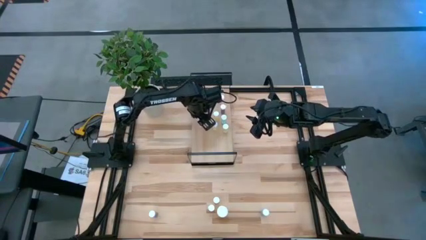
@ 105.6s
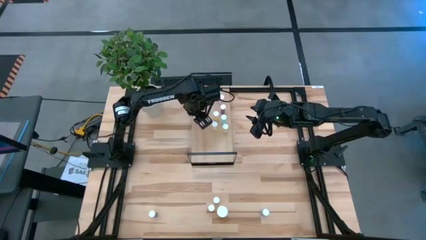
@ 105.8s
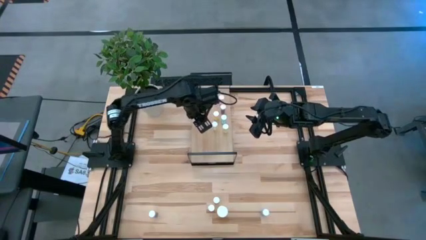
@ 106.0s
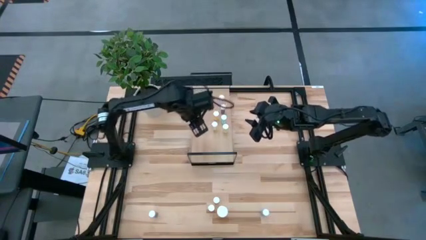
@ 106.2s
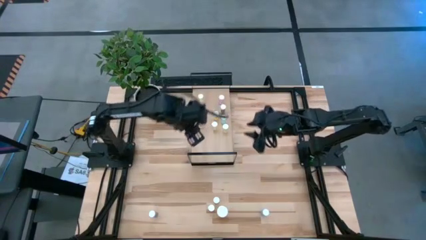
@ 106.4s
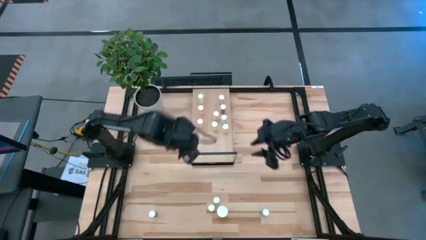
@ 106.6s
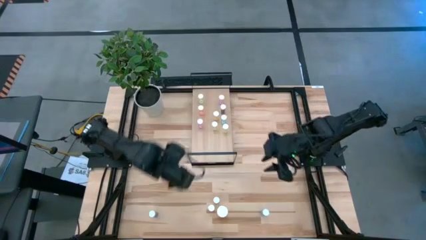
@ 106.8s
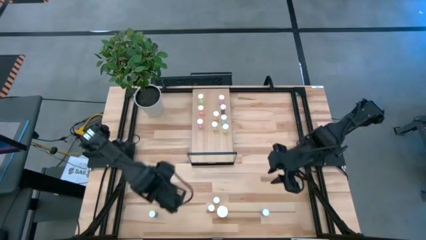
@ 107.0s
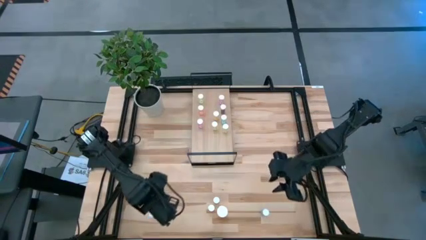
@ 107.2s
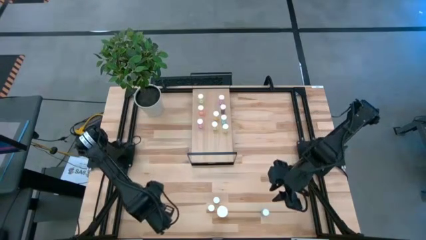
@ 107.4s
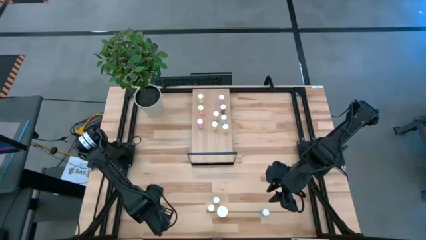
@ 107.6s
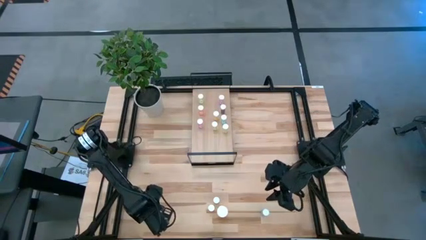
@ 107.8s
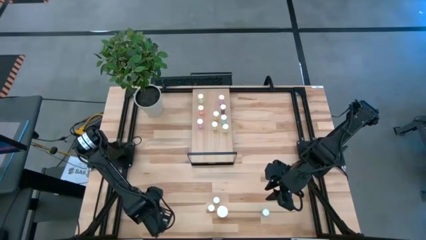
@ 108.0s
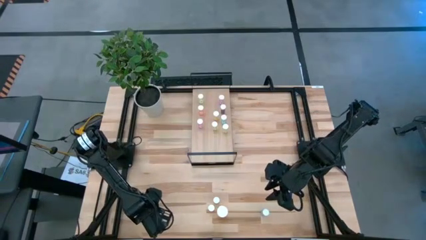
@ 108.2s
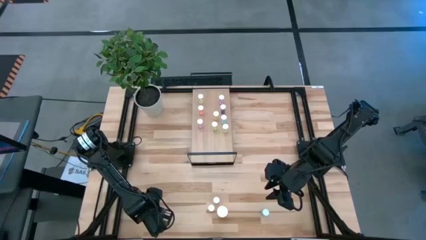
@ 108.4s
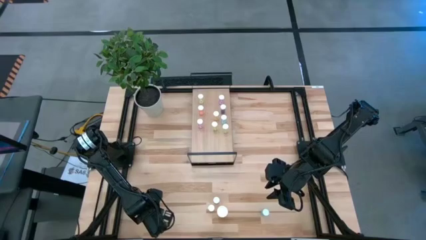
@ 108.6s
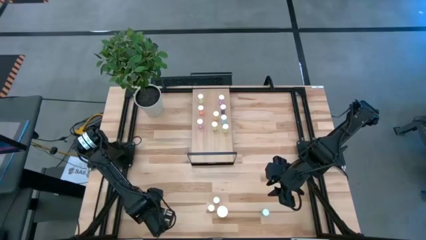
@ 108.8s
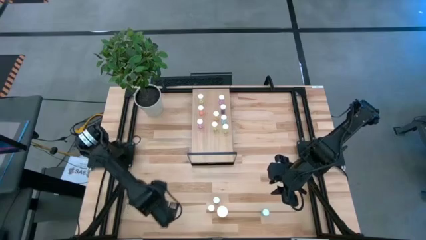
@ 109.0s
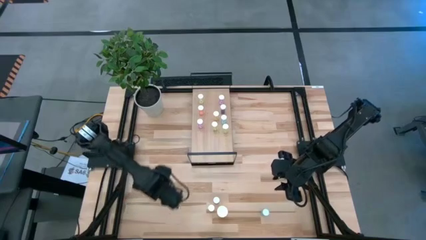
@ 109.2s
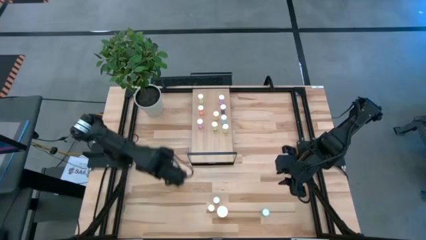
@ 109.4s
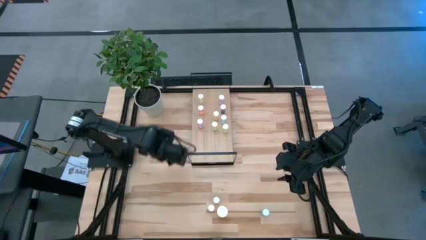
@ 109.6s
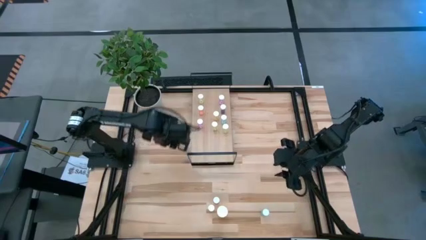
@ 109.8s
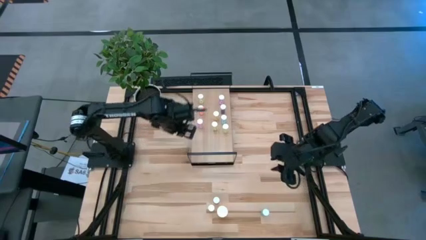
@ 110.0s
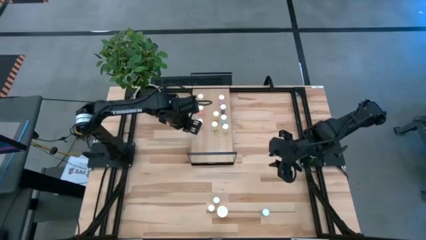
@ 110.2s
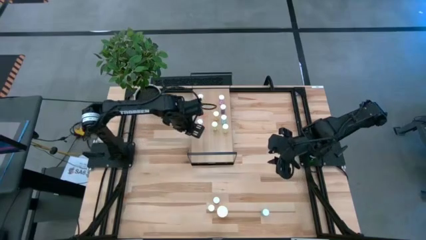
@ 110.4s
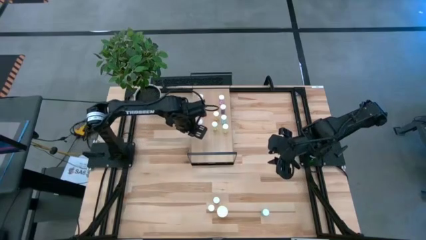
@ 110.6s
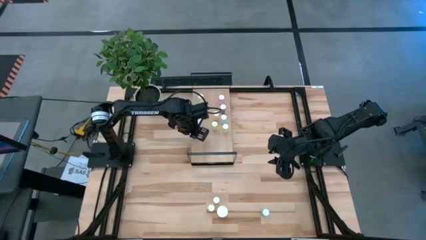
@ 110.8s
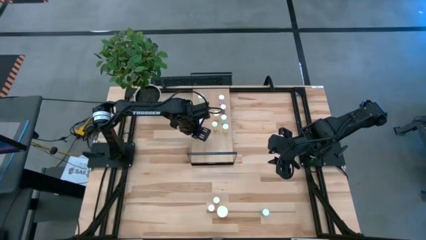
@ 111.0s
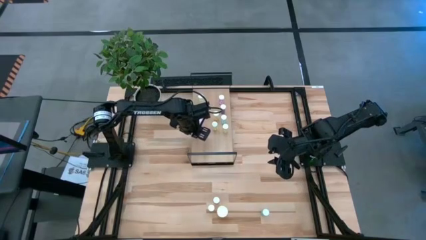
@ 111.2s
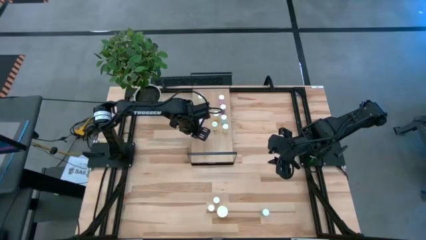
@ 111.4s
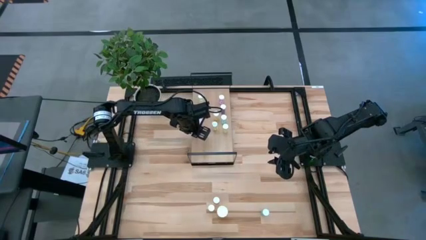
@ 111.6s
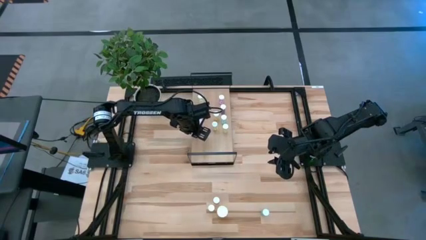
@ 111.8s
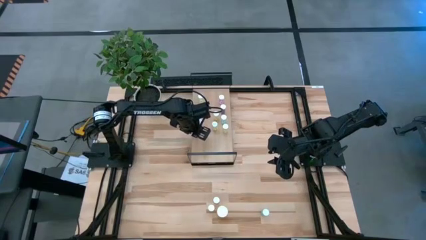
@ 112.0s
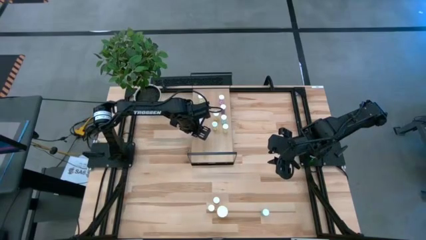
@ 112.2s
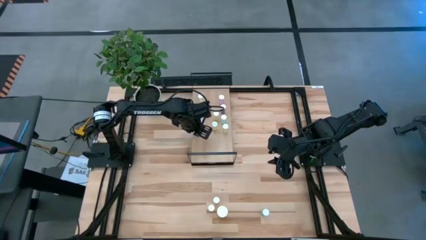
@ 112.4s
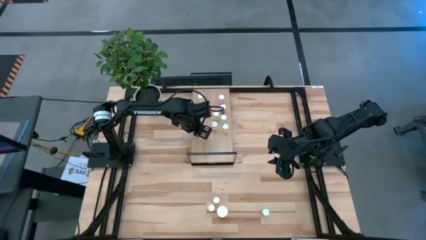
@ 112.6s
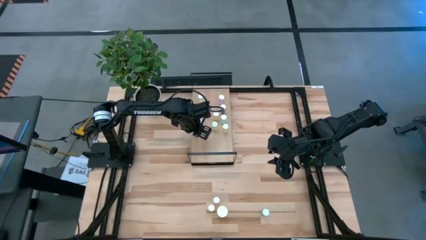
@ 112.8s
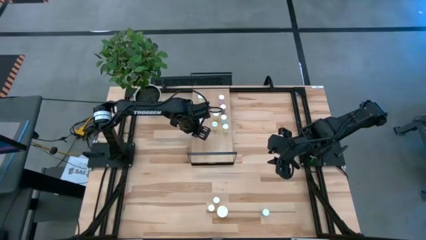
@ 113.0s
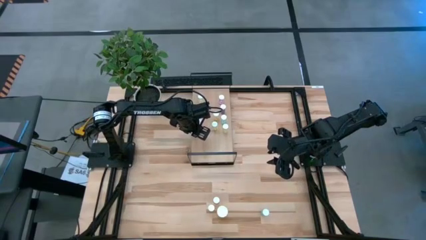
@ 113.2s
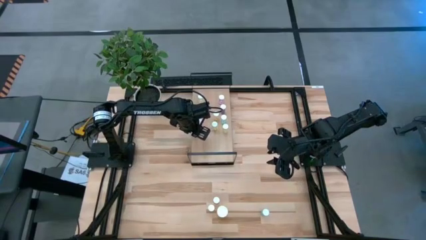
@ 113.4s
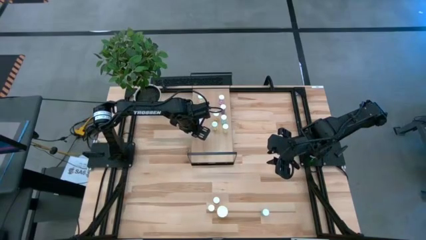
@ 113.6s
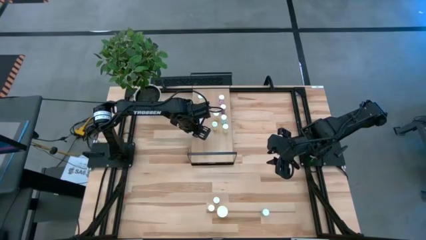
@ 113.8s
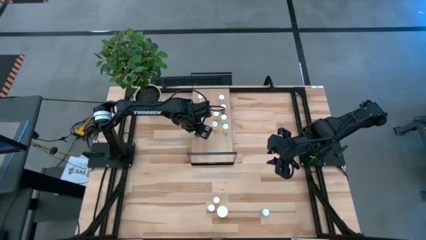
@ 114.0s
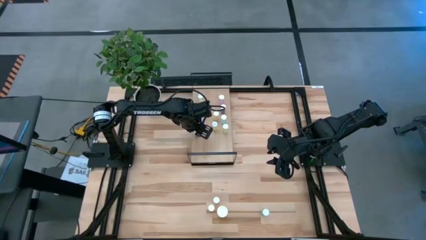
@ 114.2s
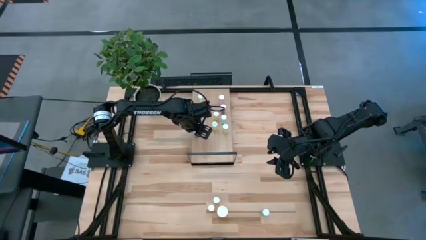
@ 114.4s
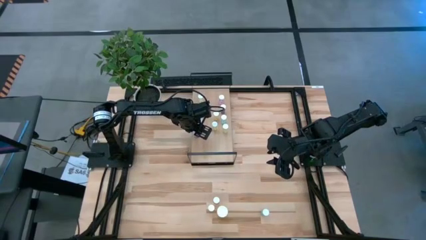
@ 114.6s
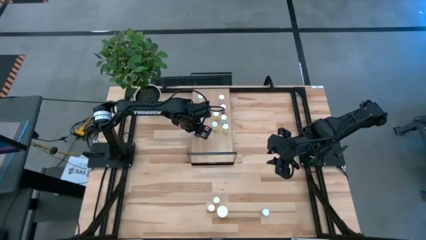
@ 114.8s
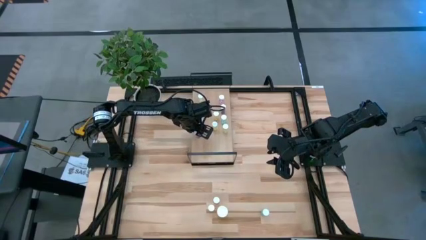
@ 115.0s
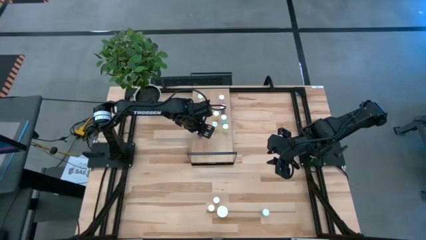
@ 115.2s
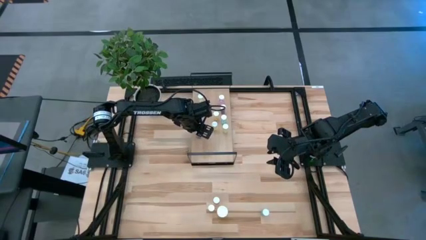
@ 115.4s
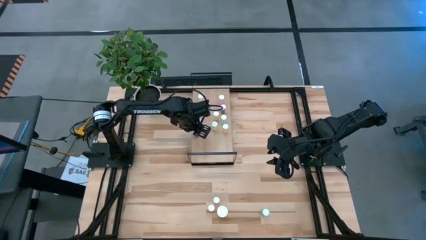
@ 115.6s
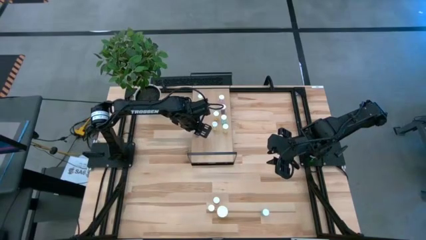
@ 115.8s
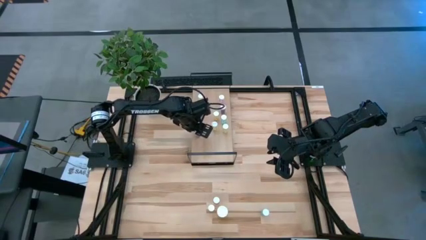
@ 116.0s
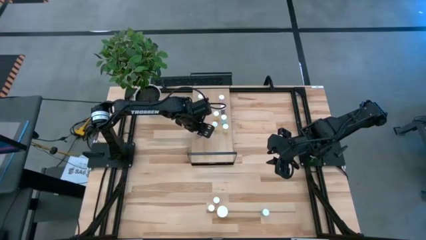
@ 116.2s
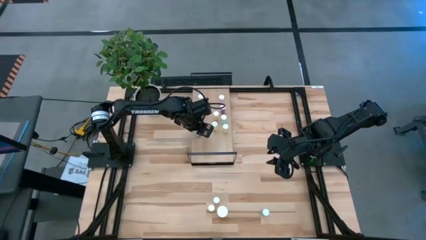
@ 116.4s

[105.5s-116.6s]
Task: Pick and place medicine bottles onto shelf by color
Put the left blue pill bottle on the shelf

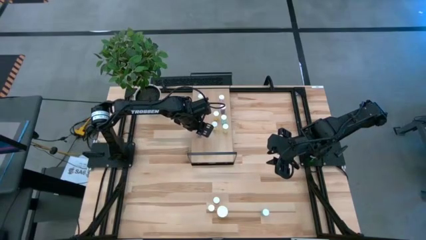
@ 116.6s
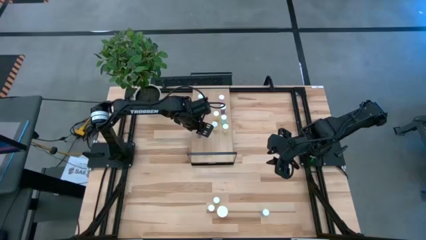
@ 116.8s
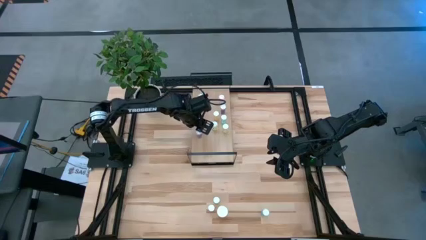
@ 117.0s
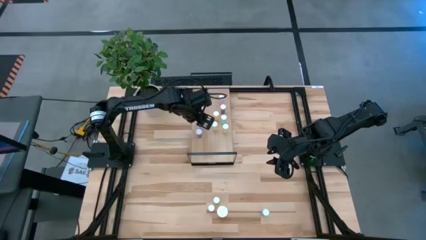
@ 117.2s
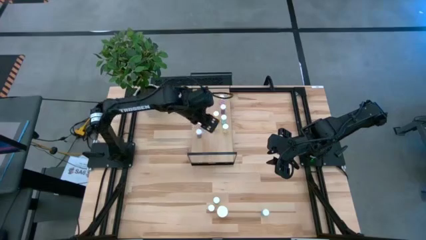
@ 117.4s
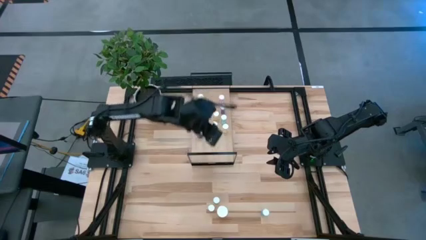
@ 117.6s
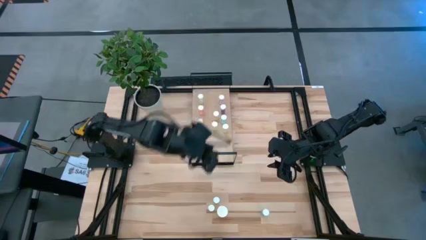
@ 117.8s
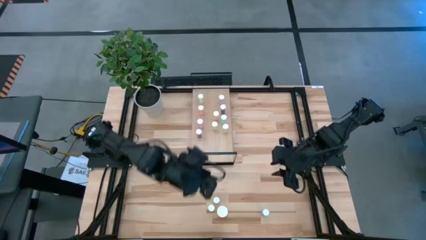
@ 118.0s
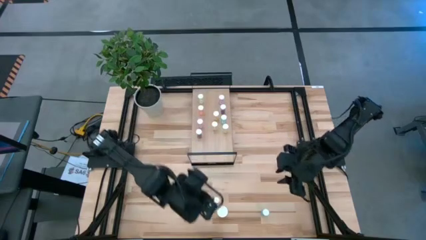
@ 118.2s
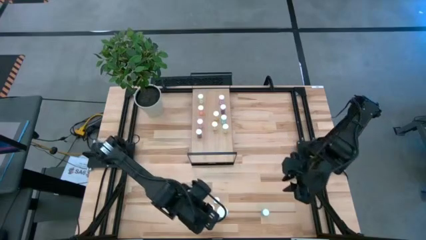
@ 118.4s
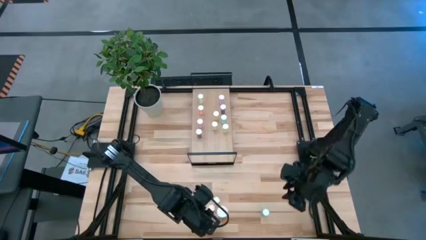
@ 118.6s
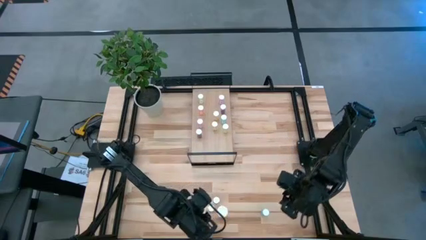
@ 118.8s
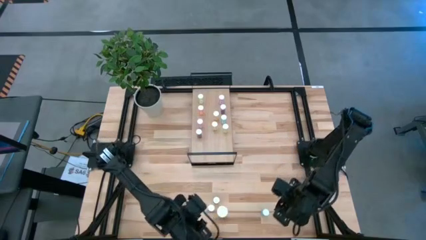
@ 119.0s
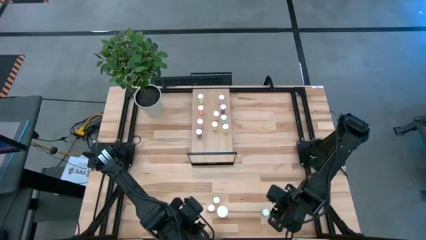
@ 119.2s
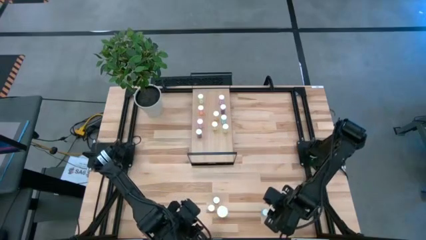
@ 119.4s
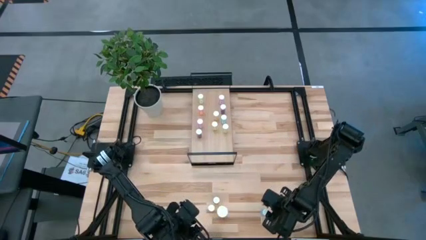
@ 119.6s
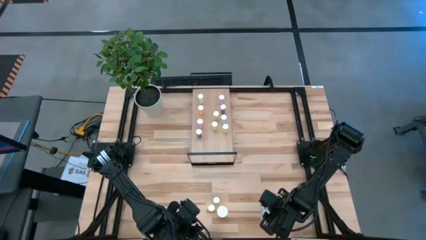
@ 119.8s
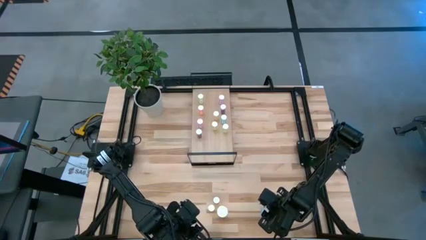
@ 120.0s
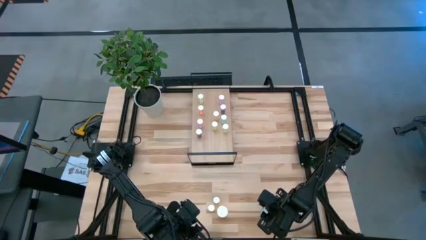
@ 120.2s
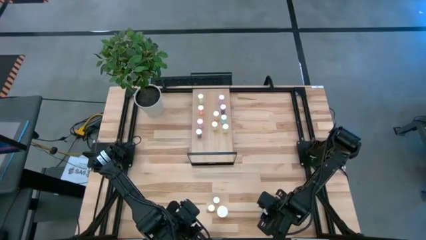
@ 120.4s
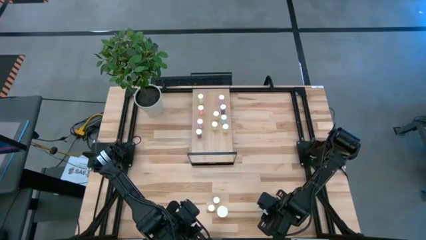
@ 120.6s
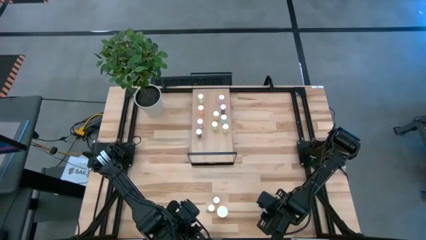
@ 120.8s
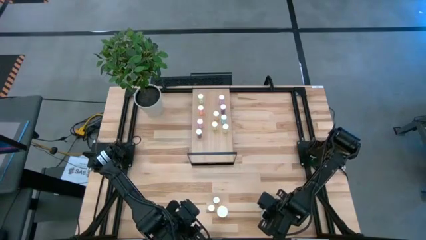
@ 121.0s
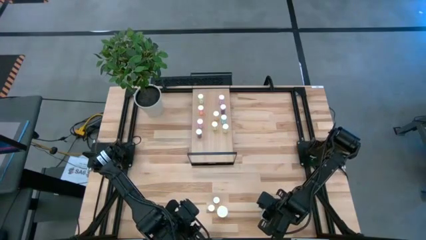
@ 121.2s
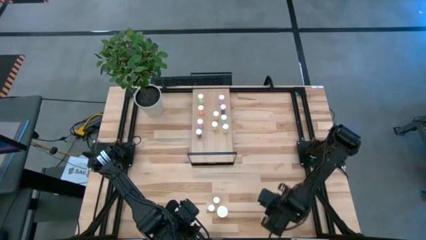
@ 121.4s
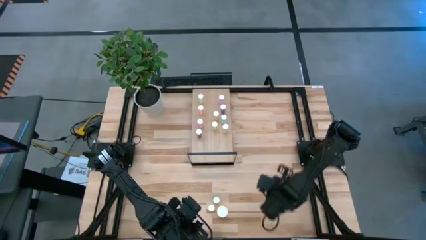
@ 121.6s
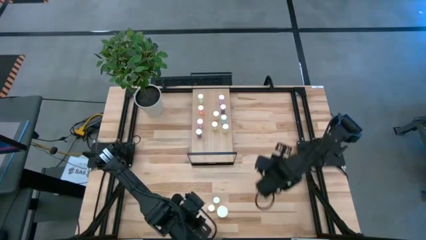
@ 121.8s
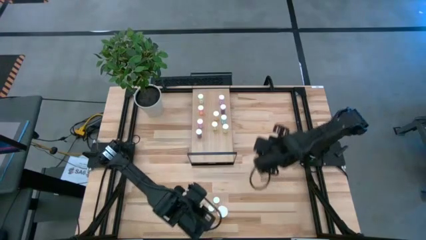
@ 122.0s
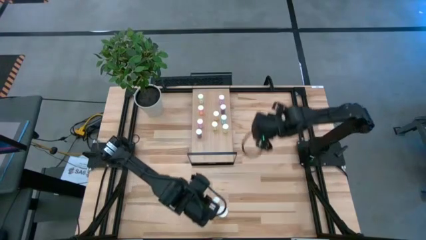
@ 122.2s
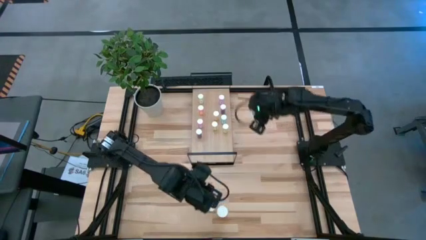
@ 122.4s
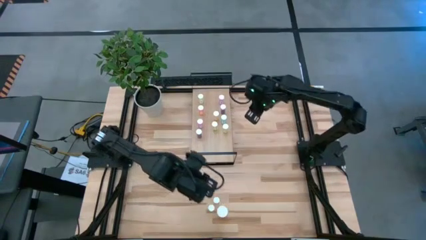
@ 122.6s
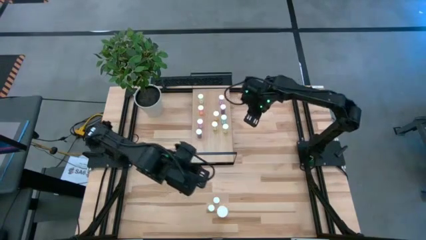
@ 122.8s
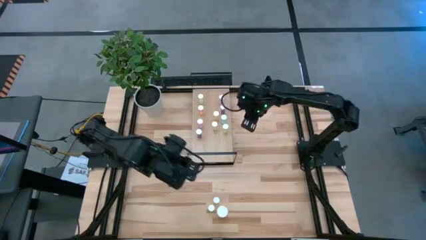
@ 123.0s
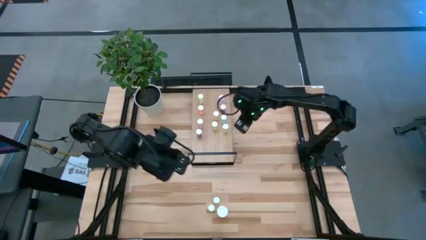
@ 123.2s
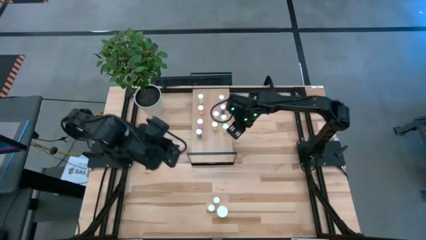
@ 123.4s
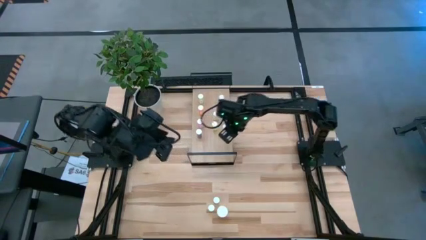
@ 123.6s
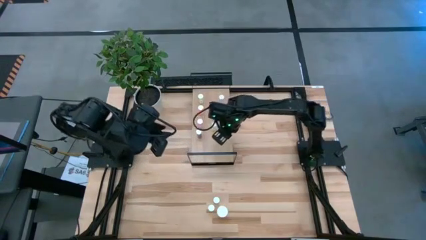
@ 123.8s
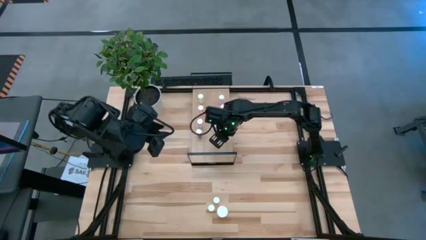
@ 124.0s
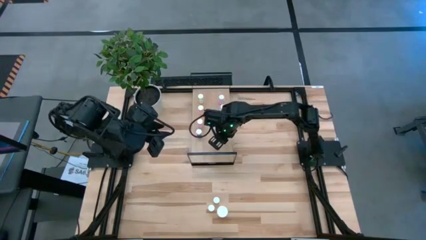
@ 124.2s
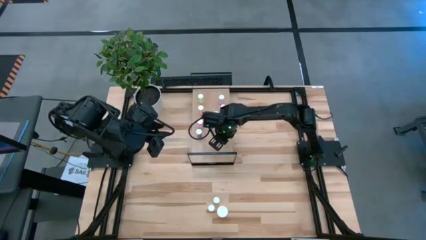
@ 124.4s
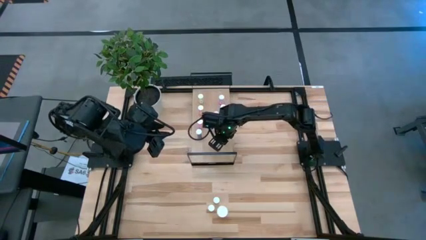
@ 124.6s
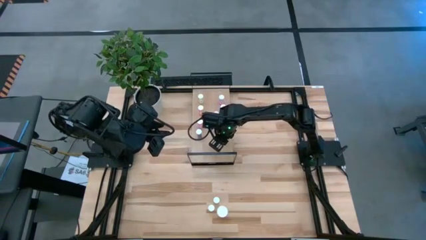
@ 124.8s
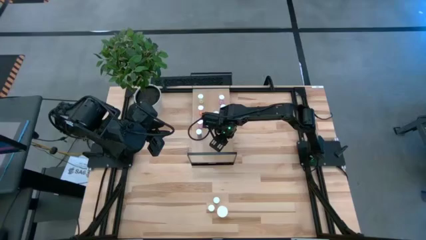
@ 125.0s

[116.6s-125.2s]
Put the right blue pill bottle on the shelf
